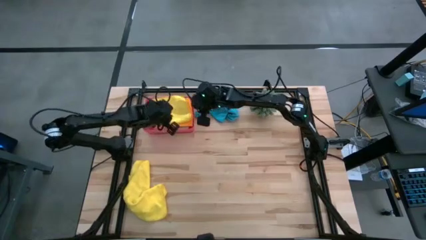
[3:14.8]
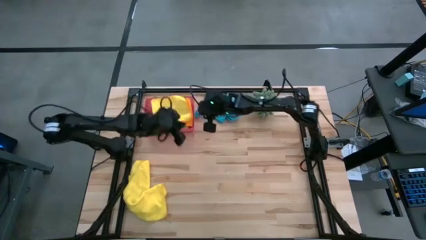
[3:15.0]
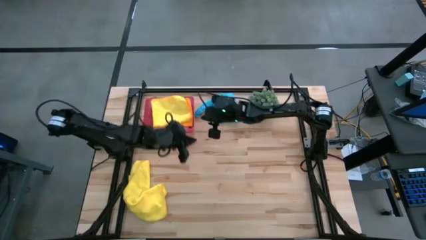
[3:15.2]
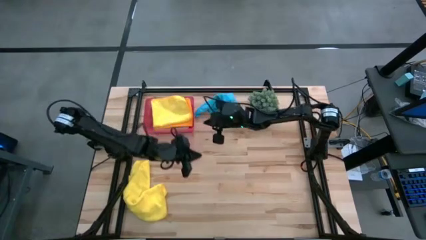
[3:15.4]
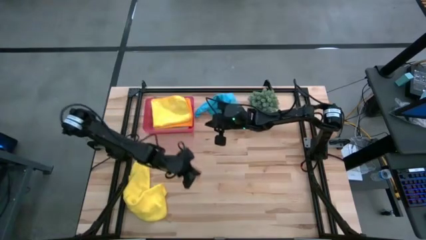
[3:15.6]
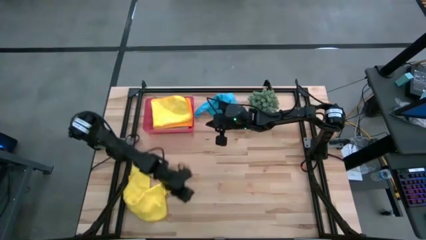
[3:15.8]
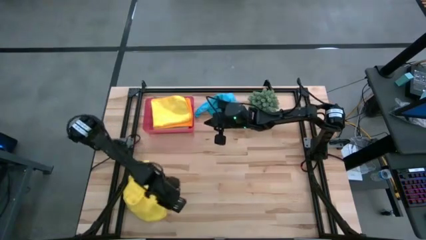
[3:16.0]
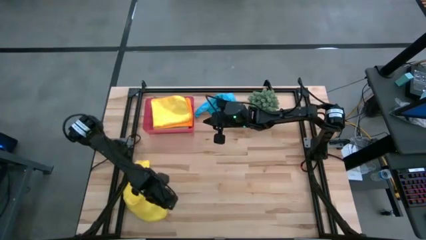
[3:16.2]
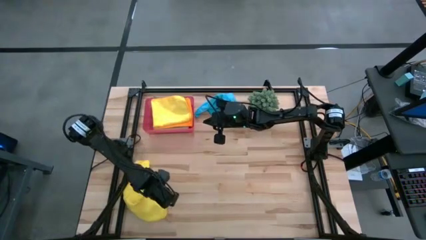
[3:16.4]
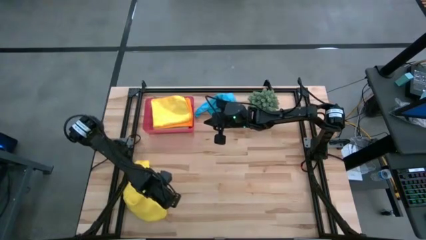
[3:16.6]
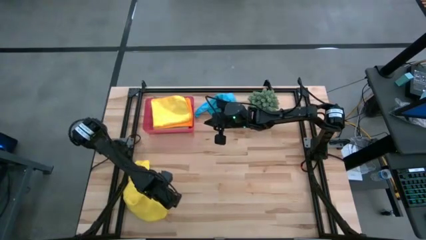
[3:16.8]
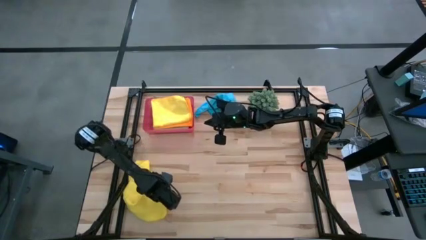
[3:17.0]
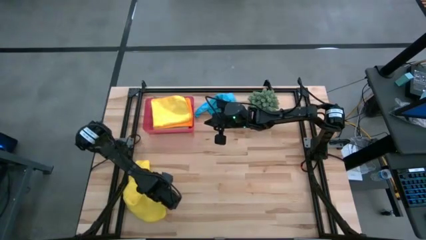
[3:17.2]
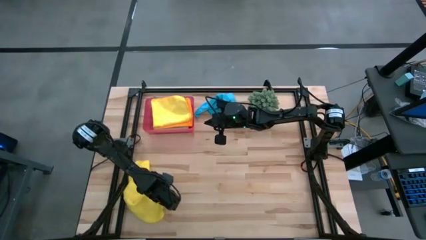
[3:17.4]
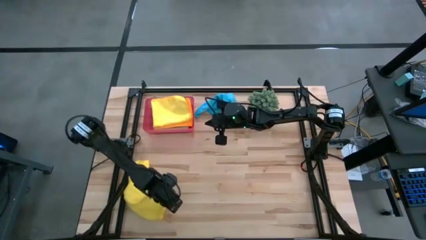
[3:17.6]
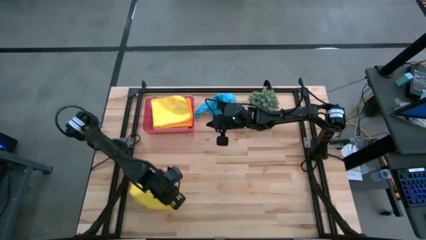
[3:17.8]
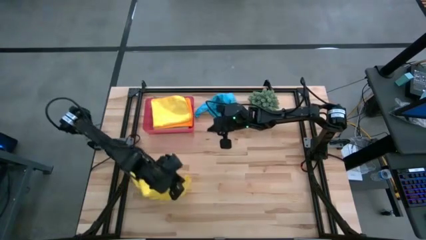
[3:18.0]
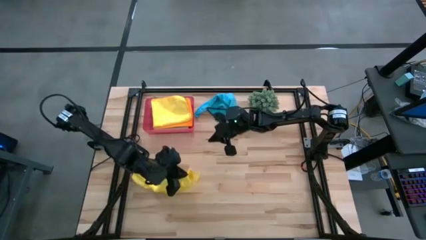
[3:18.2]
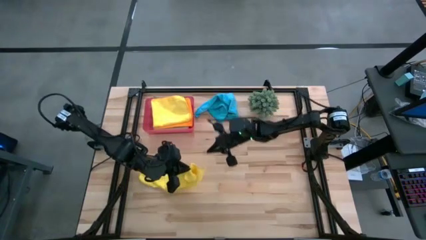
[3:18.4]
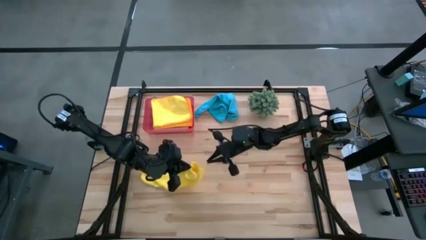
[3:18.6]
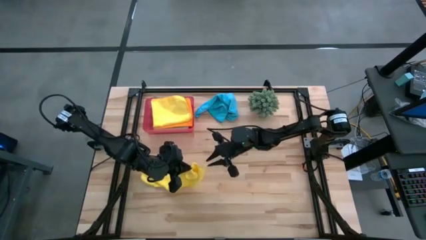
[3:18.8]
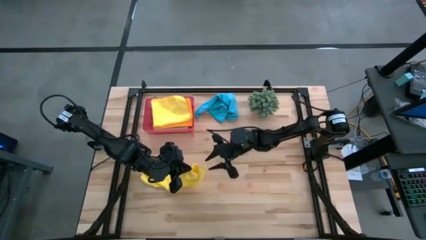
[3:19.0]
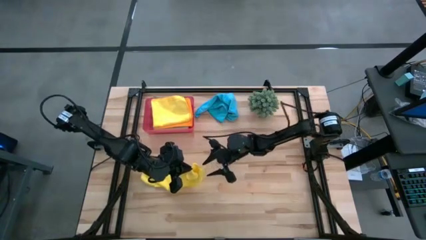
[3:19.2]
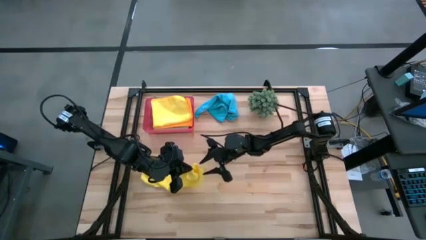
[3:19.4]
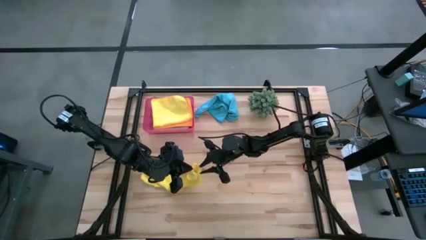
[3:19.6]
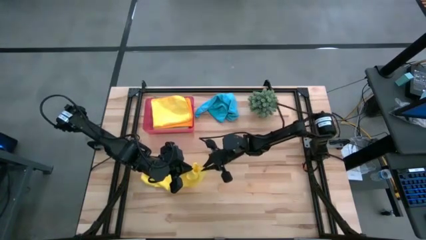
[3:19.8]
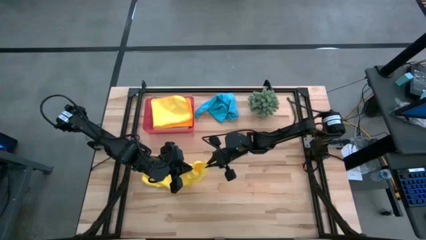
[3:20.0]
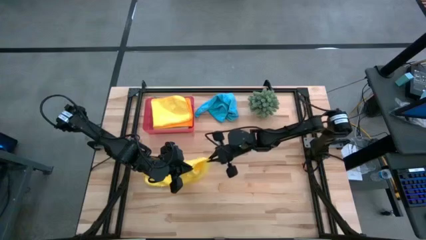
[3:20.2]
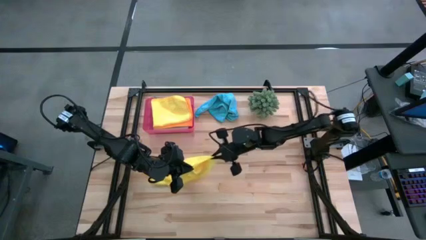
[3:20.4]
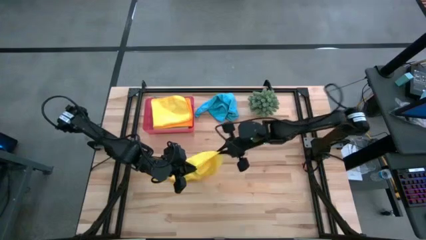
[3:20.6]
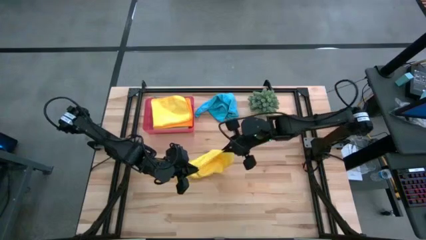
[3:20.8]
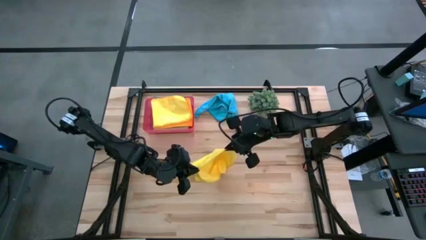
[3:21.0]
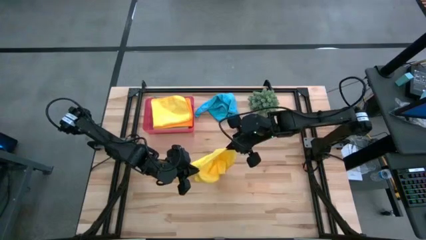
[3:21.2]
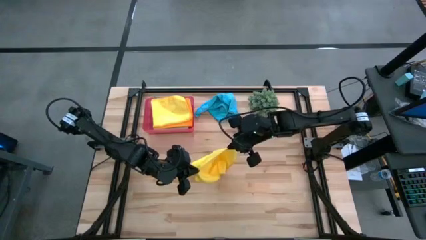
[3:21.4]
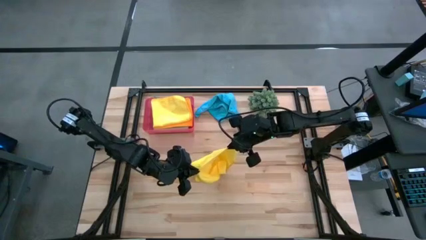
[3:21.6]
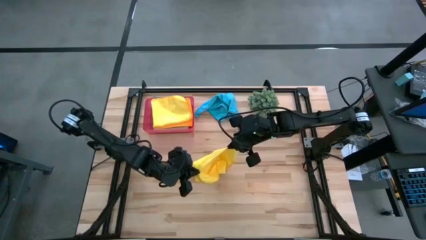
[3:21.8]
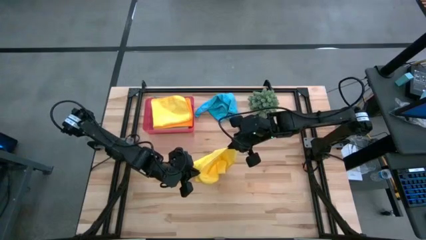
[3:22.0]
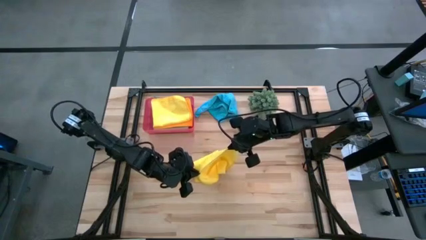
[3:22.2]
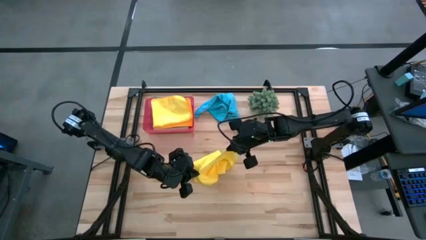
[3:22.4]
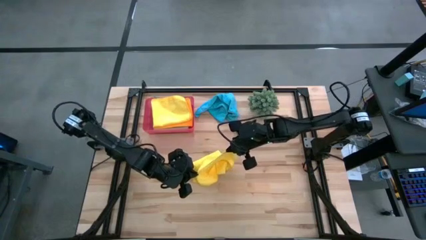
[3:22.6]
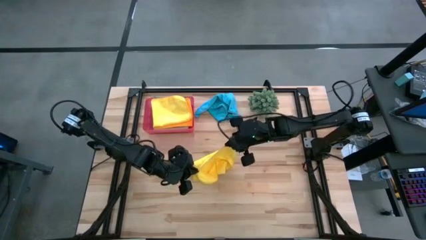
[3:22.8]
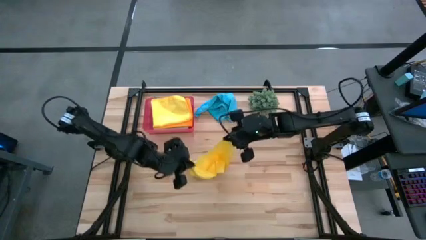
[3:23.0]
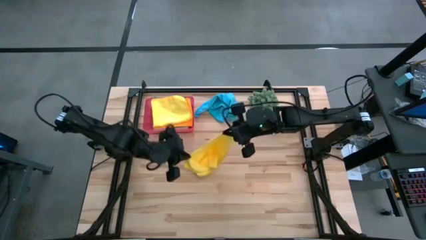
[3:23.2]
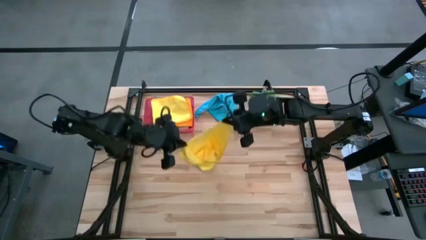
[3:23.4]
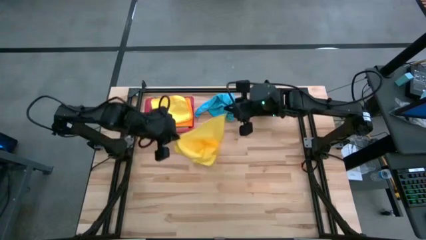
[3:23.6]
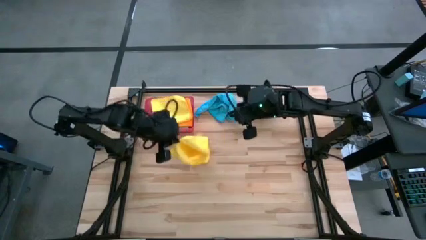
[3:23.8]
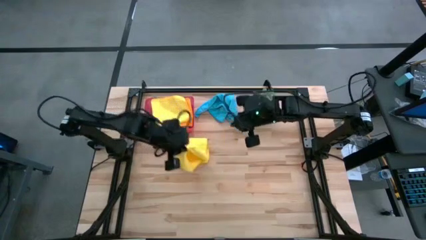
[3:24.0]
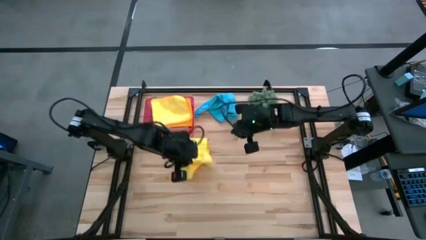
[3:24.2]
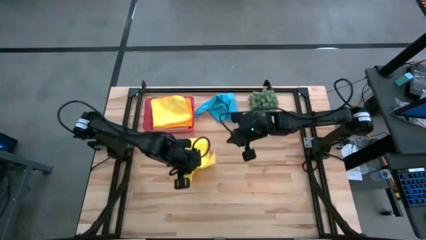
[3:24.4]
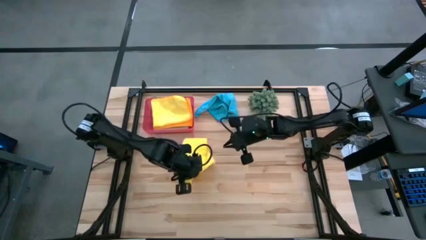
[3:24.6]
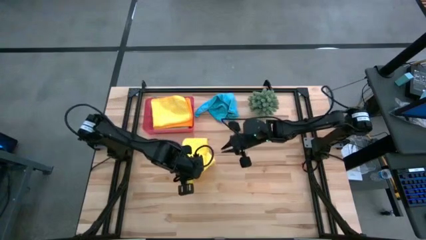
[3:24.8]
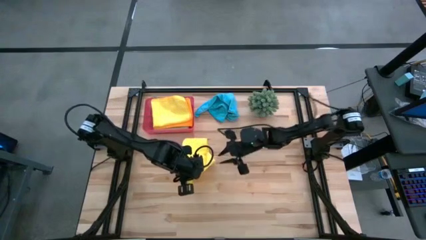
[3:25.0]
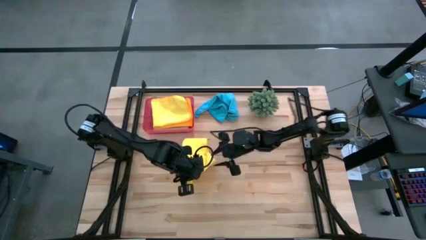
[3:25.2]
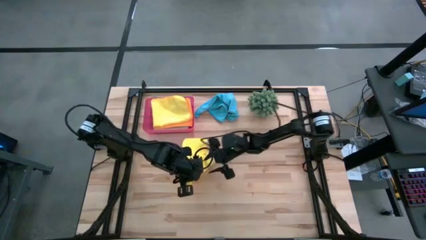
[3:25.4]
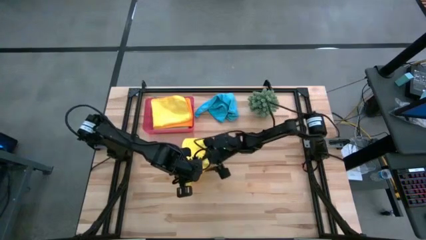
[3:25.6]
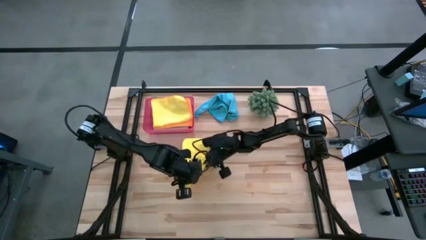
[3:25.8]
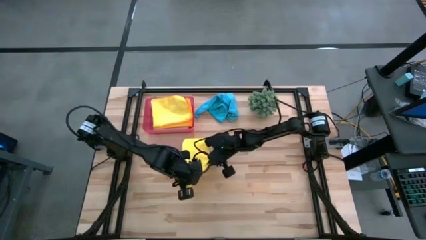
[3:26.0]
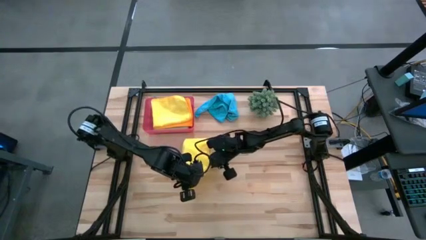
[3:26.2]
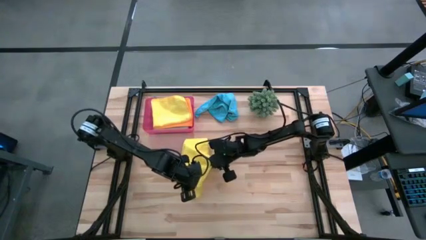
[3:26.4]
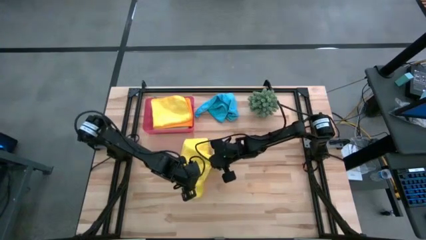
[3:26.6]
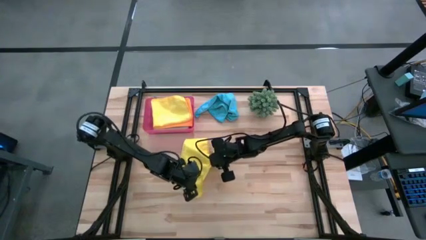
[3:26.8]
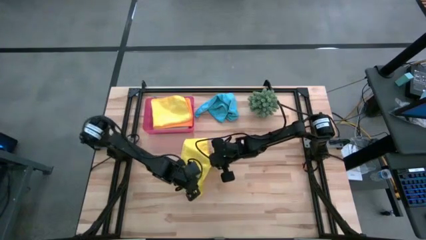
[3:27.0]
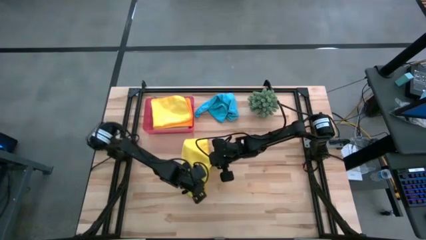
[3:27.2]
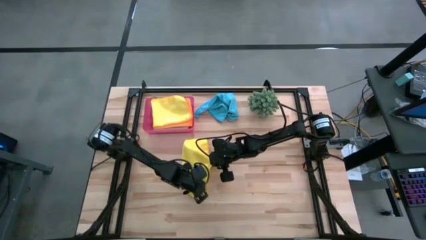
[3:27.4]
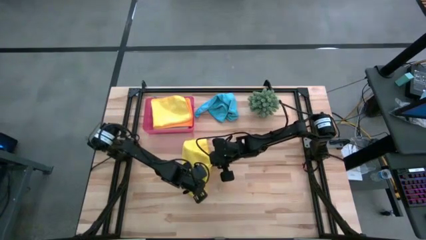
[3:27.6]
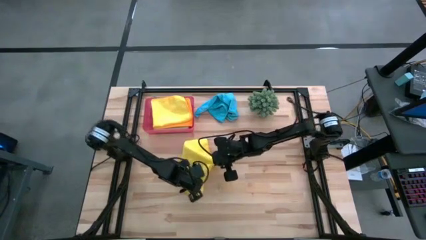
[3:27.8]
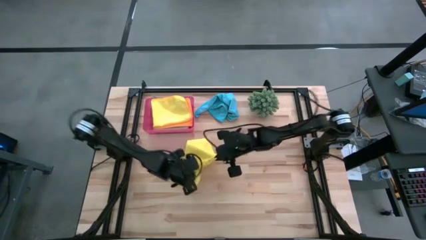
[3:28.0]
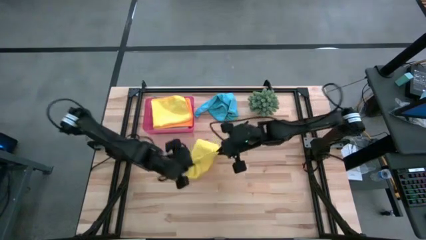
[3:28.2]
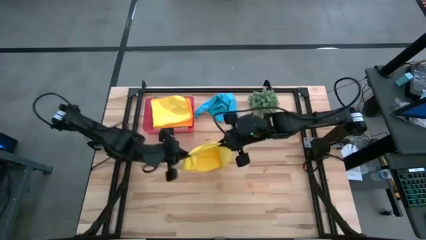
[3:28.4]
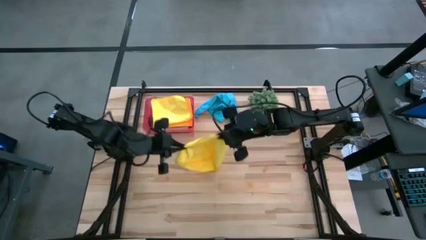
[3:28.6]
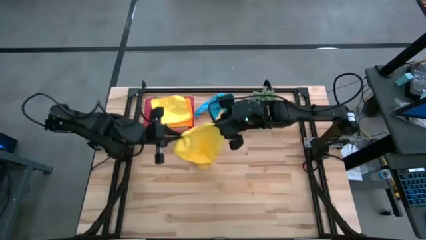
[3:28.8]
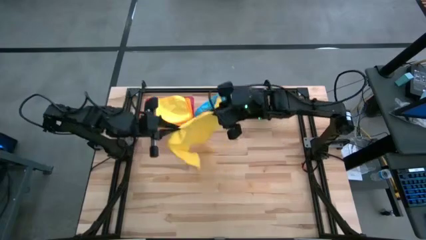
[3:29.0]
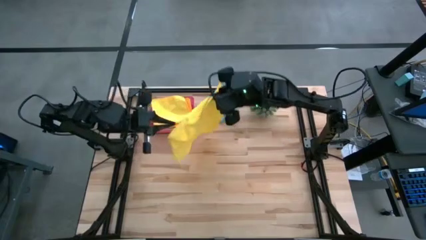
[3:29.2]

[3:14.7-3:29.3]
Task: Fold microfiber towels
Fold the yellow towel
